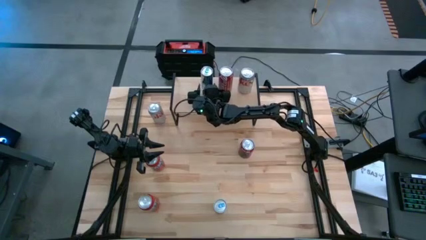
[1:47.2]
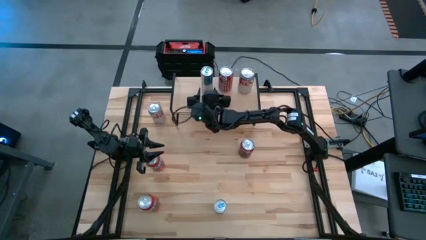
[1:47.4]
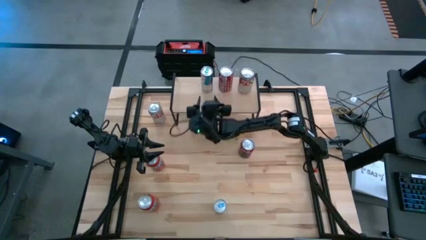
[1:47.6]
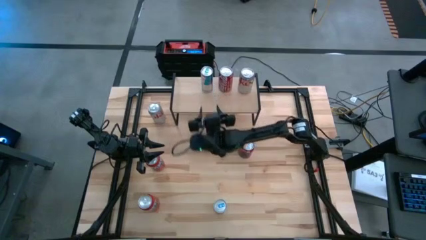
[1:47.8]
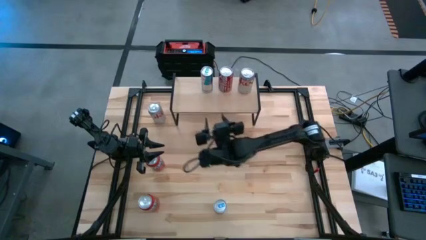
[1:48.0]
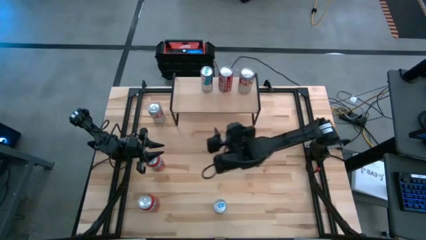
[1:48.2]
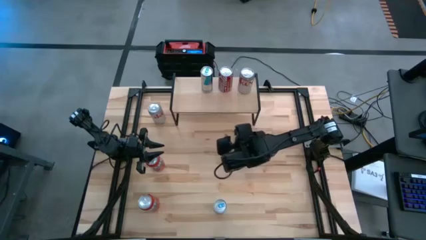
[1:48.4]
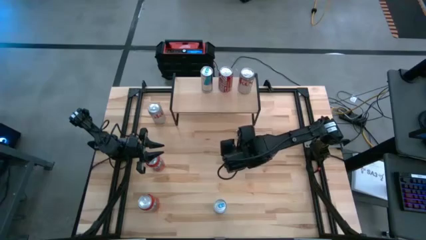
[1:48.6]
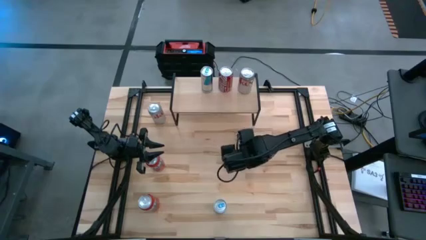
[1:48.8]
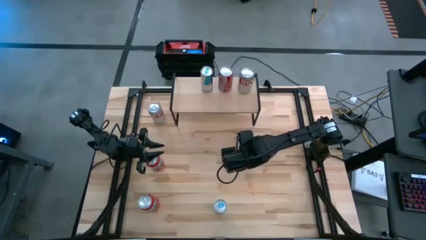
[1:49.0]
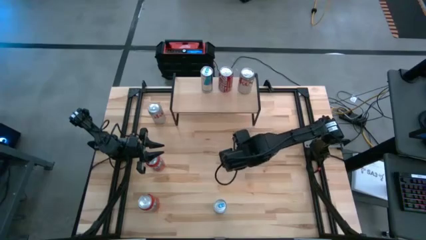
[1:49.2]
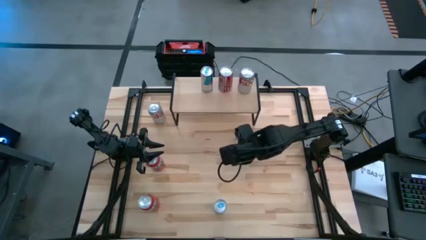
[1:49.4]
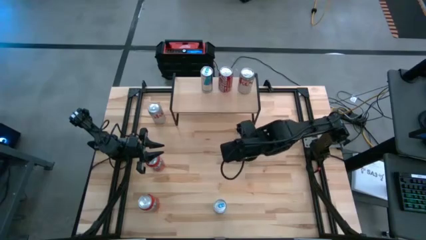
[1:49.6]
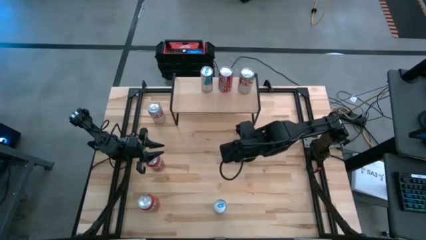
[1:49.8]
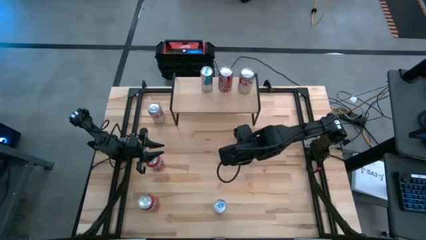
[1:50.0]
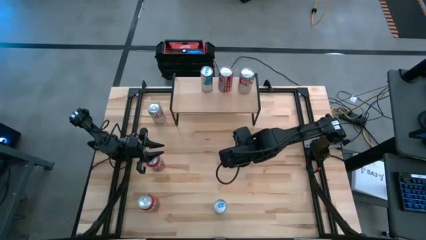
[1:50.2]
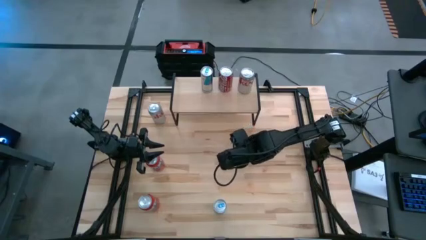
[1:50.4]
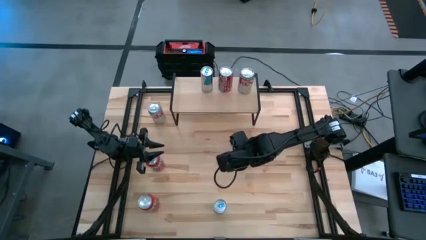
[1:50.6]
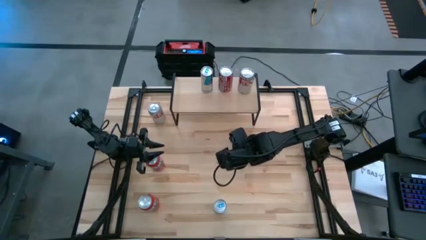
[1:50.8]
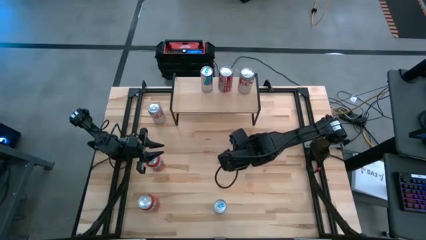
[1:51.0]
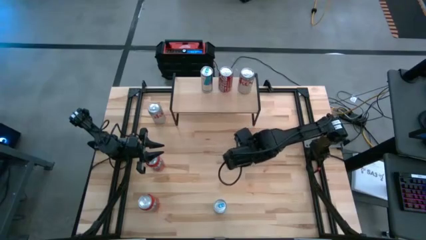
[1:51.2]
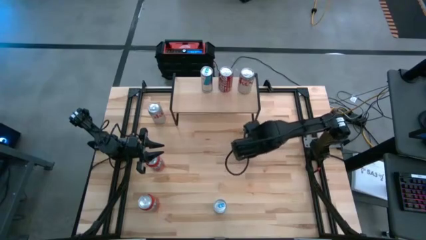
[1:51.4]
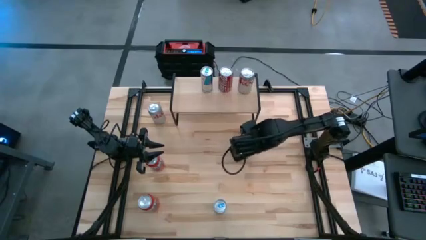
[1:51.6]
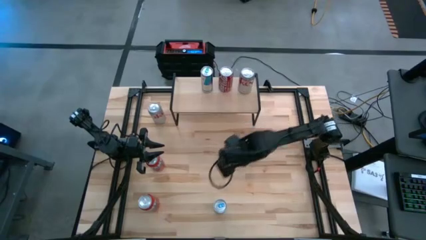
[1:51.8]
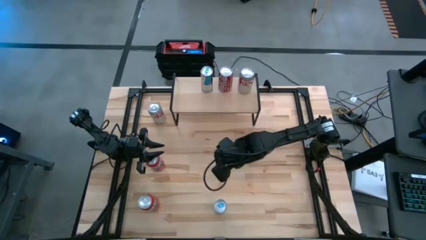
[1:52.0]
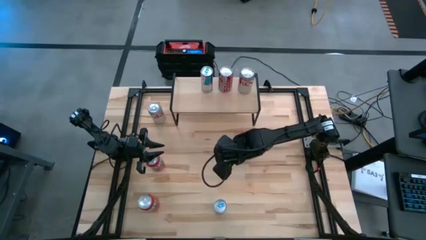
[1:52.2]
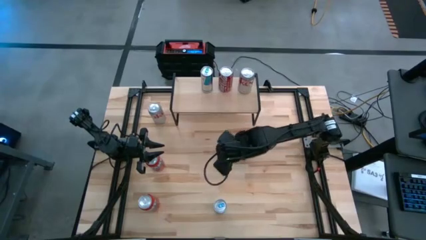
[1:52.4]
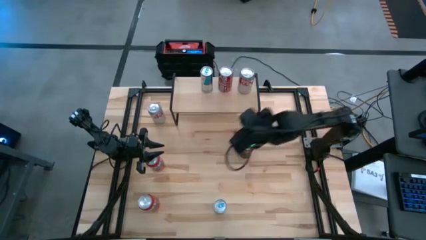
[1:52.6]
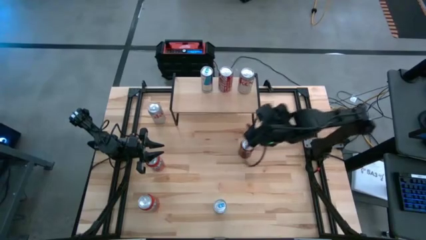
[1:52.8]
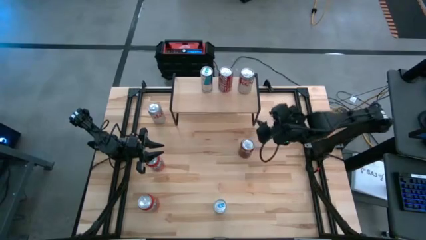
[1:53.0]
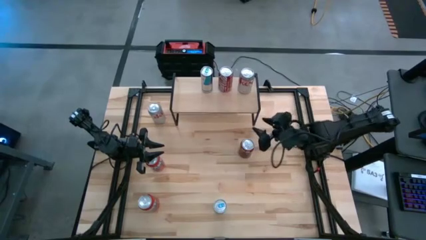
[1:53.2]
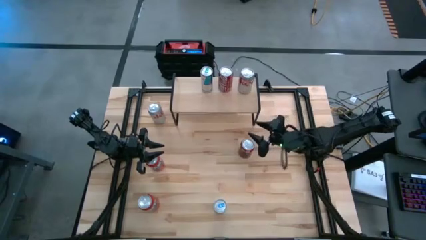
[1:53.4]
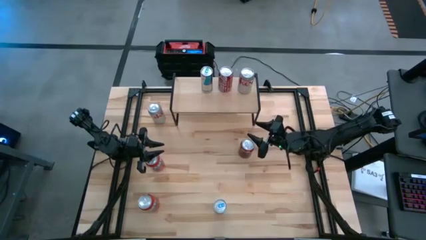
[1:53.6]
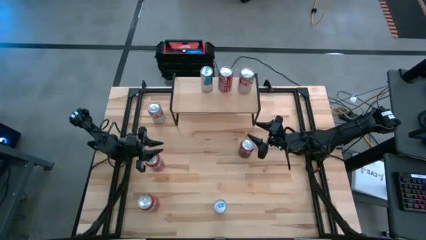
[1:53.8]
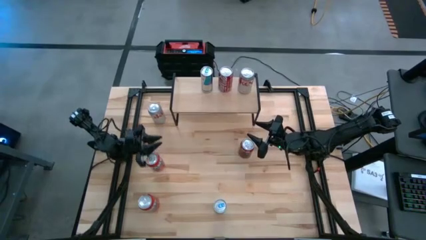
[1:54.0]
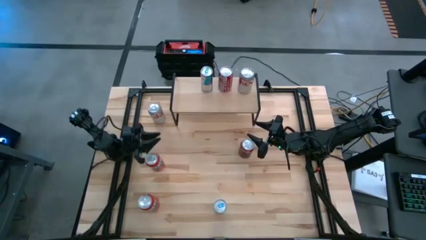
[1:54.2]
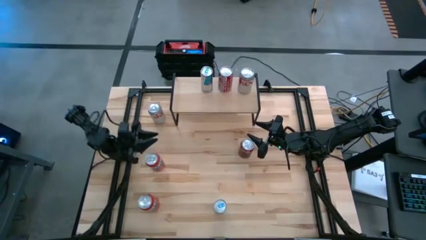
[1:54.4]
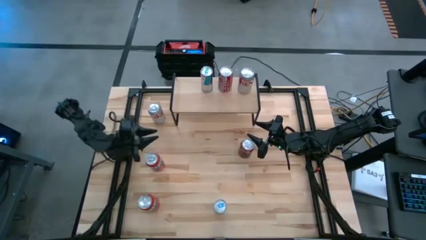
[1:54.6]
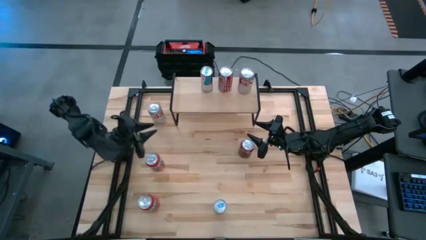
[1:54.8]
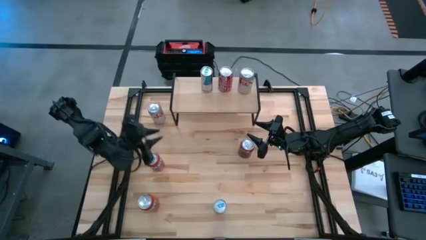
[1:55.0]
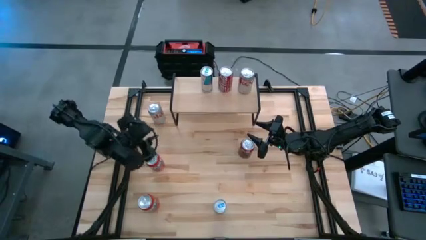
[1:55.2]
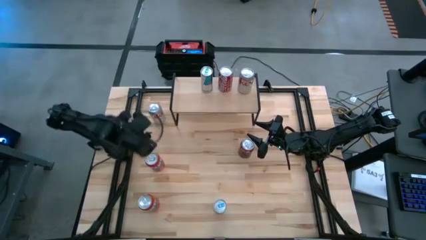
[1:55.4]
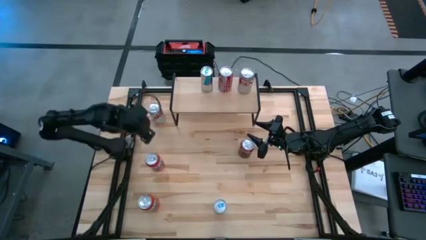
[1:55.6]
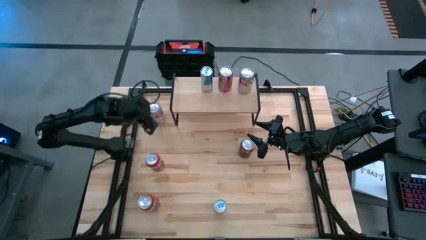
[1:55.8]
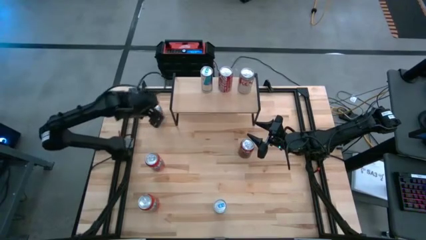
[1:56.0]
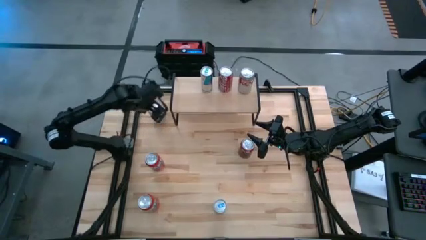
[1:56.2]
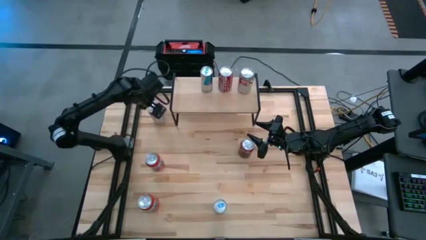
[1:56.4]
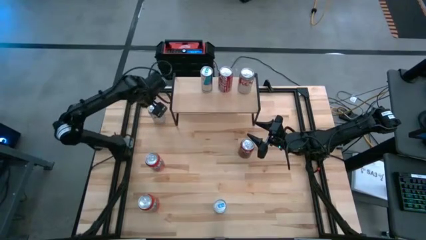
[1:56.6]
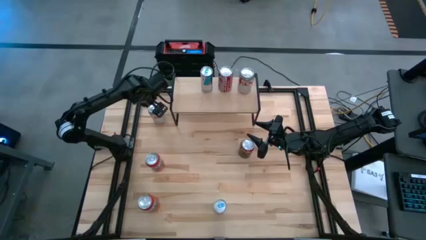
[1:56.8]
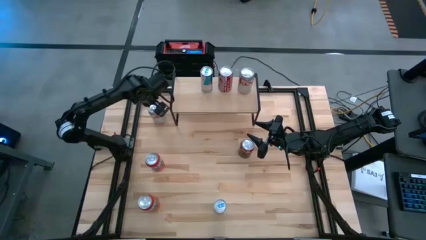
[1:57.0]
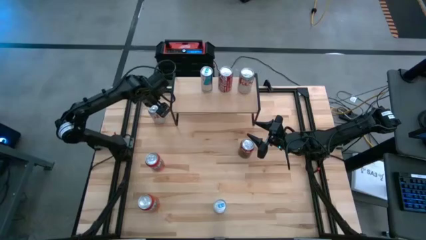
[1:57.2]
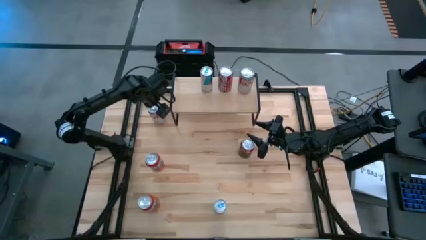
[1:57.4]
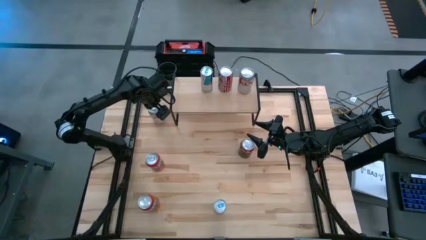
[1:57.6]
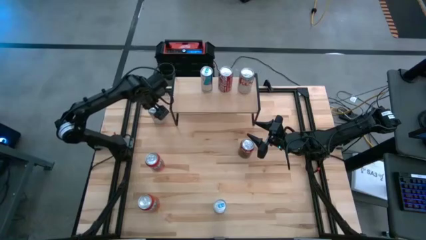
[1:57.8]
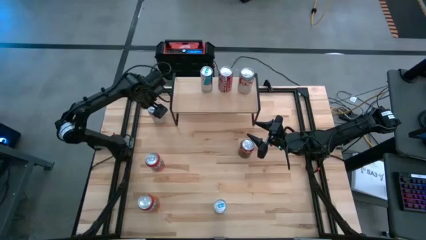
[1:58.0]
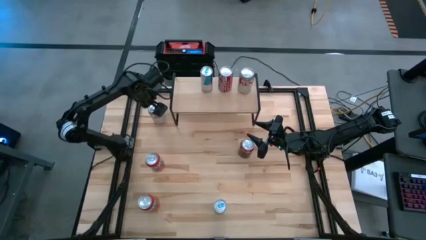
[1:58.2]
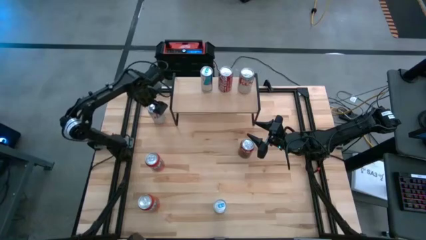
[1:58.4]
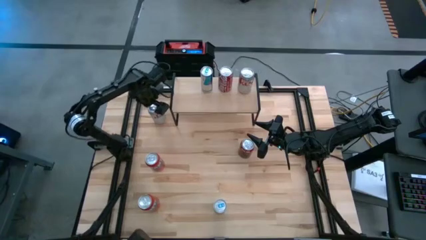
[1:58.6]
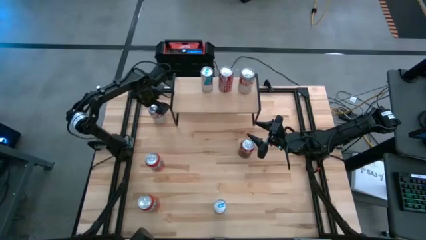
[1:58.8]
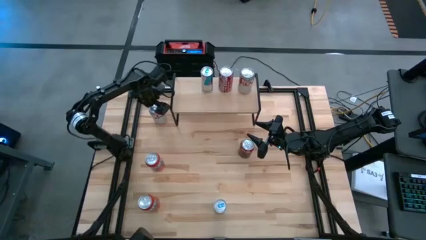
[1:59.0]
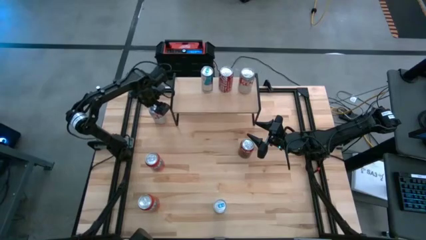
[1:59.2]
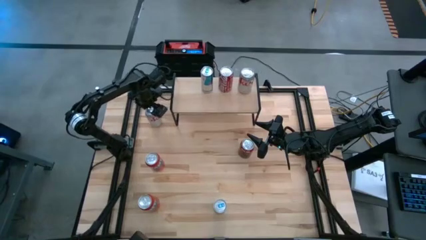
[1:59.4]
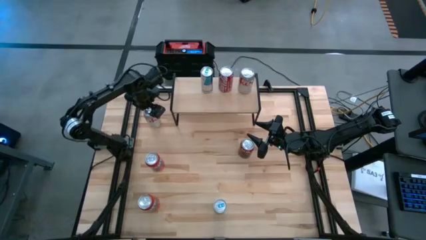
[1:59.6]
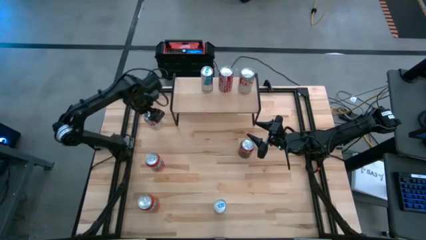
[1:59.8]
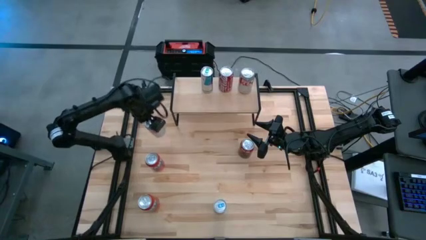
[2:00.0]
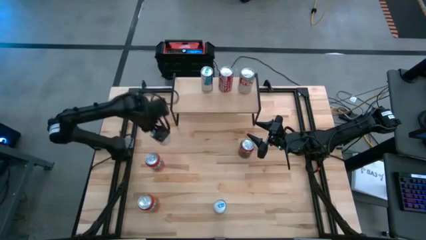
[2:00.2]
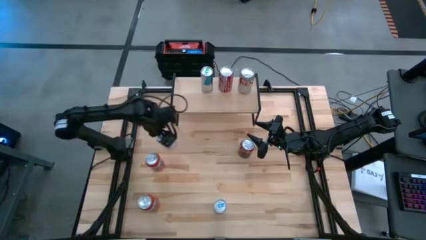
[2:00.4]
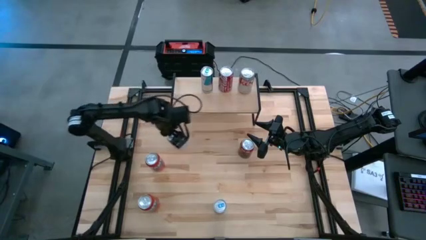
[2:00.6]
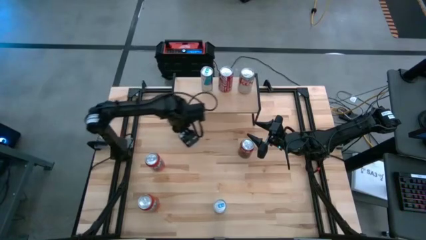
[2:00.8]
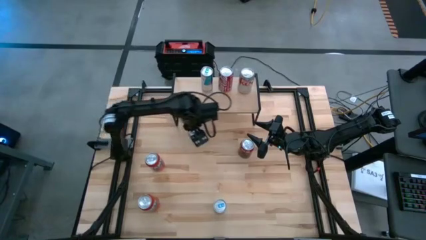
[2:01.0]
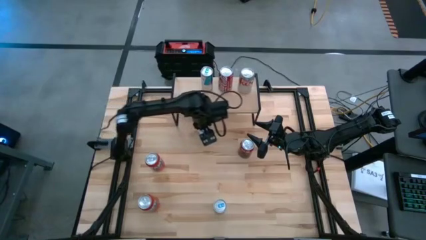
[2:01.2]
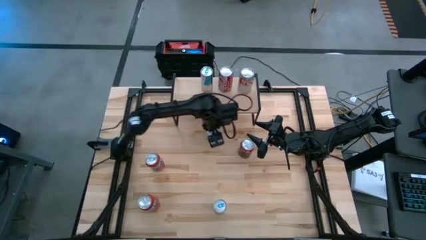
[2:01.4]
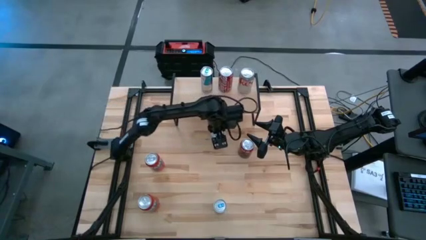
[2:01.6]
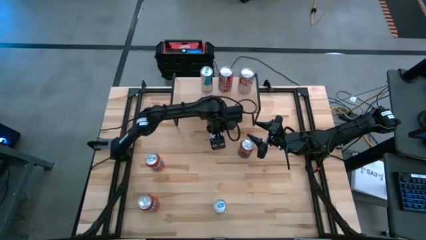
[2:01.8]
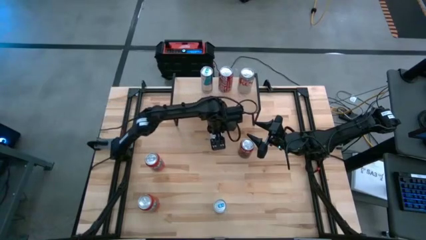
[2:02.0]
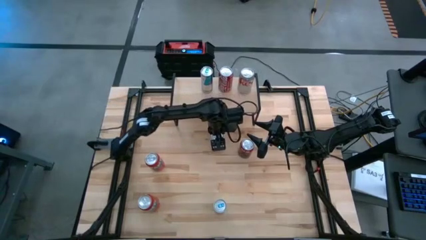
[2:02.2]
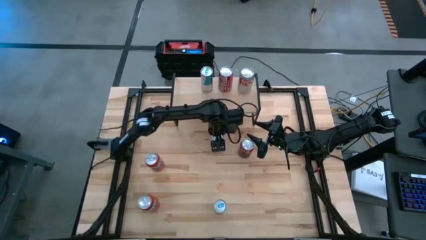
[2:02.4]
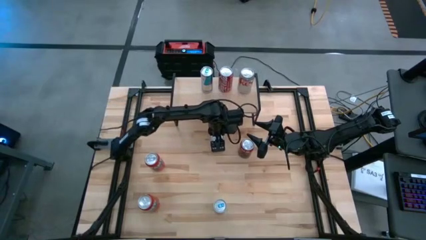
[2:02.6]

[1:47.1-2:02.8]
Task: Place canned beverage on shelf
Move the red and silver soda can
